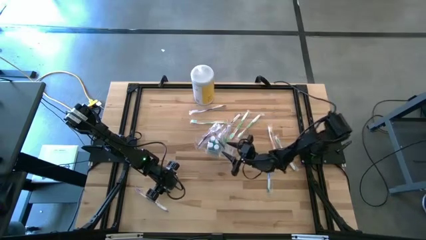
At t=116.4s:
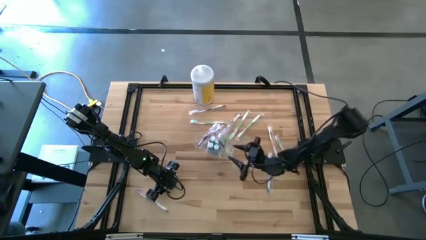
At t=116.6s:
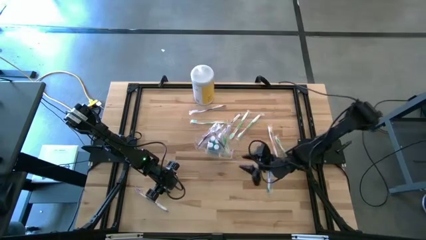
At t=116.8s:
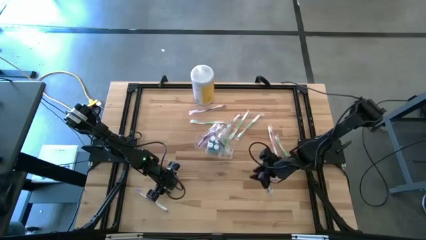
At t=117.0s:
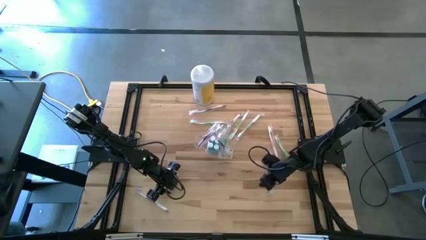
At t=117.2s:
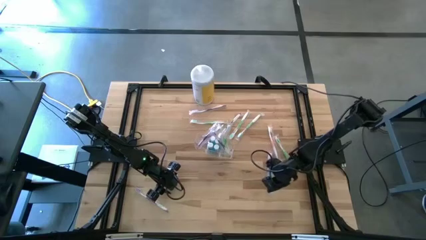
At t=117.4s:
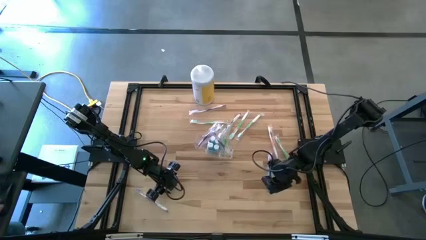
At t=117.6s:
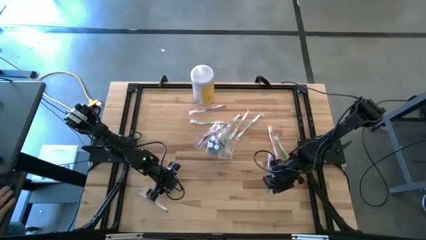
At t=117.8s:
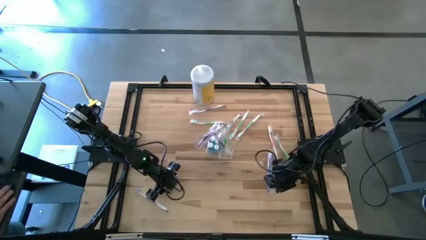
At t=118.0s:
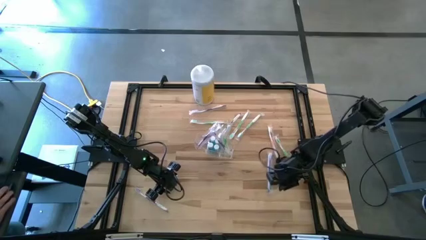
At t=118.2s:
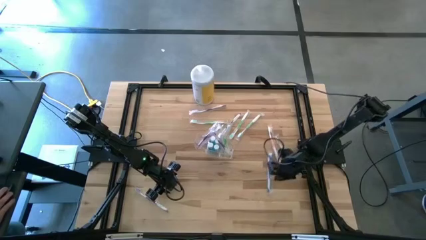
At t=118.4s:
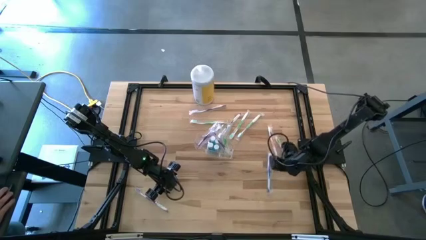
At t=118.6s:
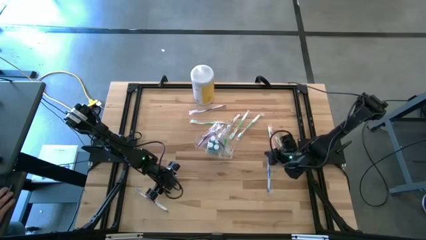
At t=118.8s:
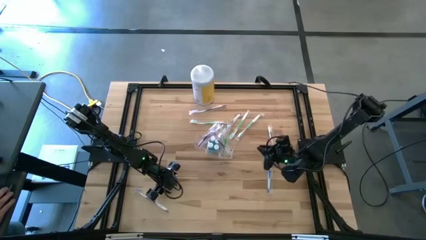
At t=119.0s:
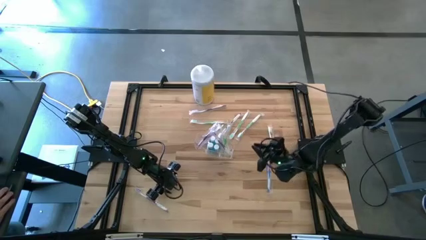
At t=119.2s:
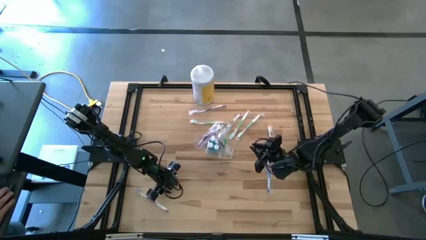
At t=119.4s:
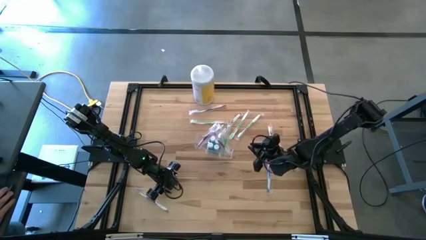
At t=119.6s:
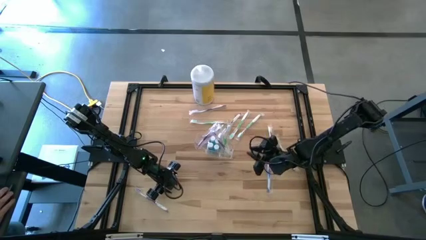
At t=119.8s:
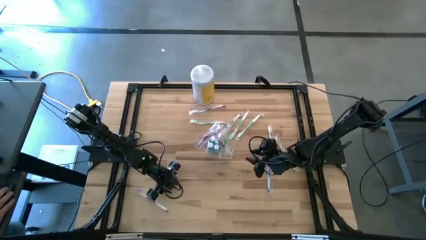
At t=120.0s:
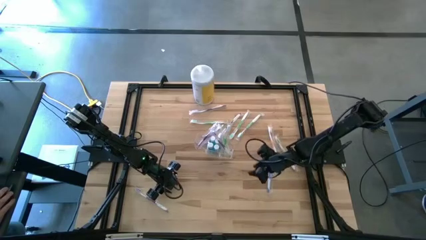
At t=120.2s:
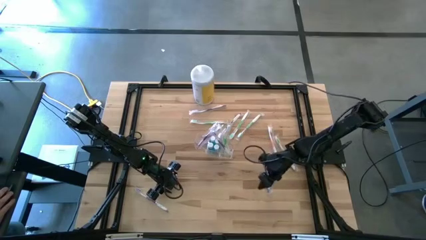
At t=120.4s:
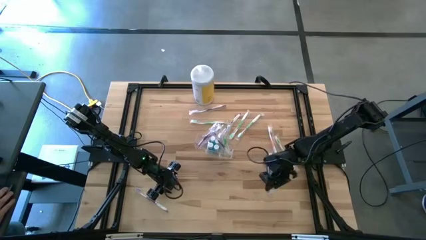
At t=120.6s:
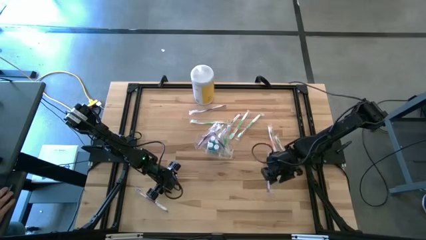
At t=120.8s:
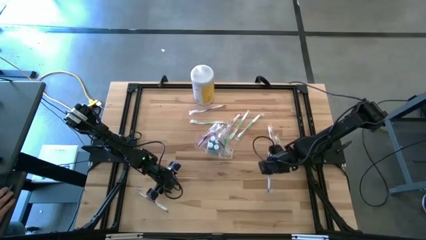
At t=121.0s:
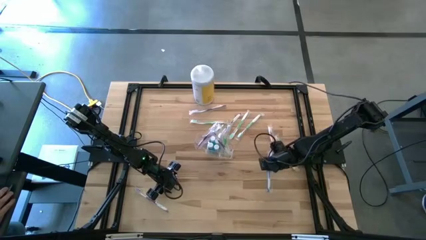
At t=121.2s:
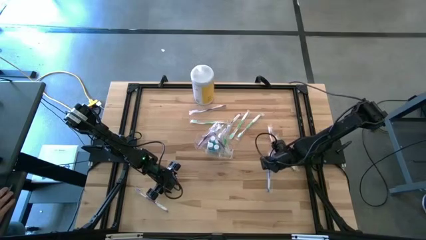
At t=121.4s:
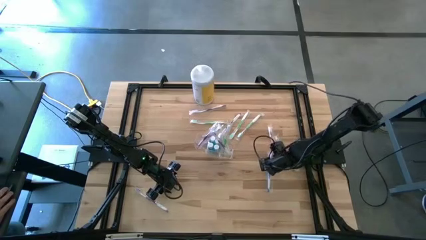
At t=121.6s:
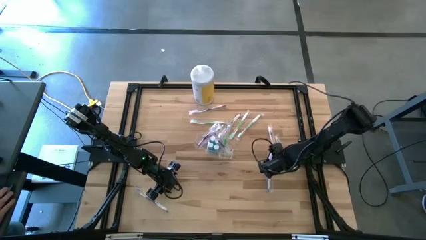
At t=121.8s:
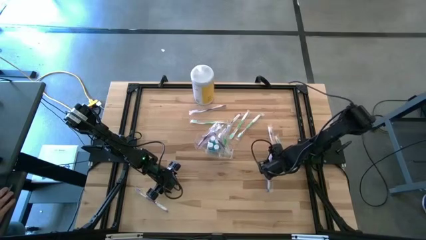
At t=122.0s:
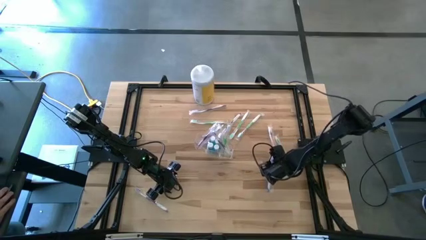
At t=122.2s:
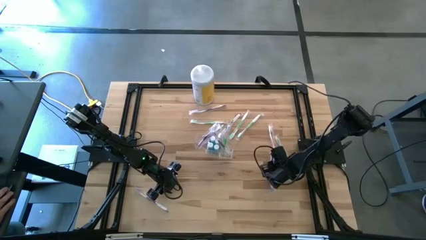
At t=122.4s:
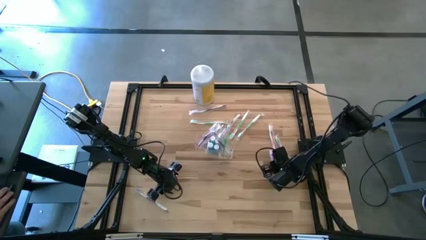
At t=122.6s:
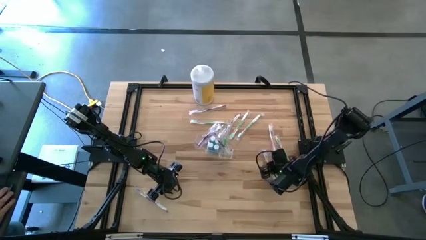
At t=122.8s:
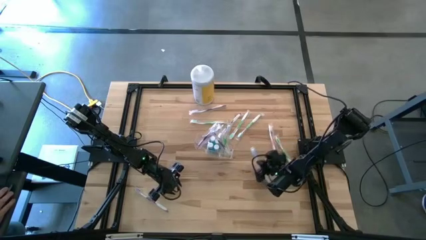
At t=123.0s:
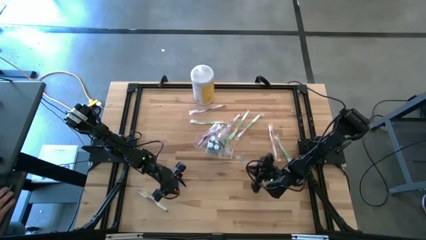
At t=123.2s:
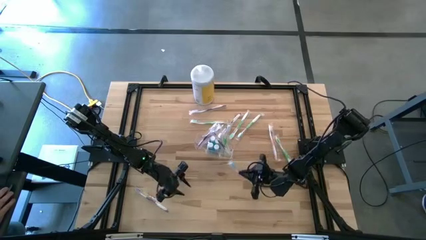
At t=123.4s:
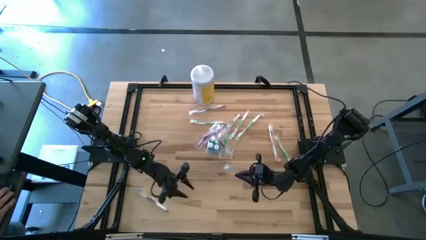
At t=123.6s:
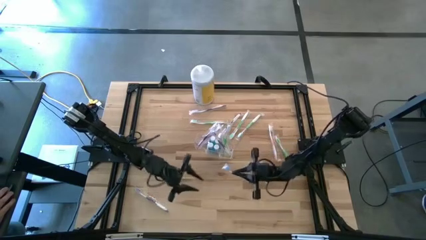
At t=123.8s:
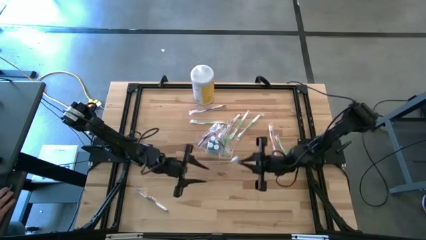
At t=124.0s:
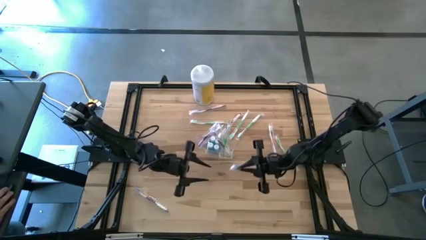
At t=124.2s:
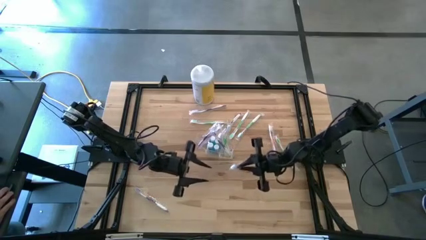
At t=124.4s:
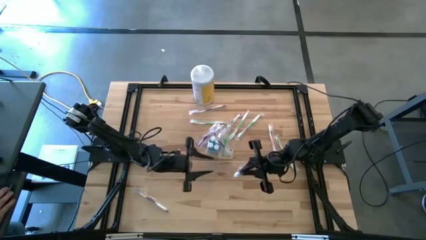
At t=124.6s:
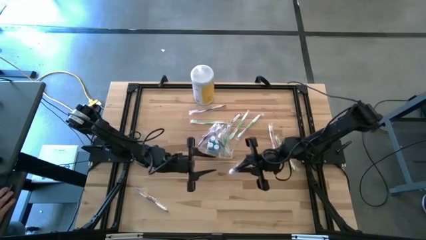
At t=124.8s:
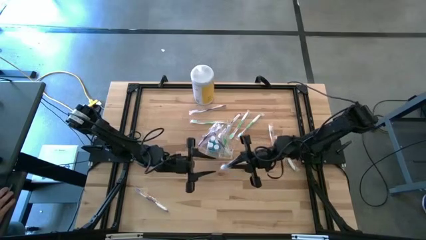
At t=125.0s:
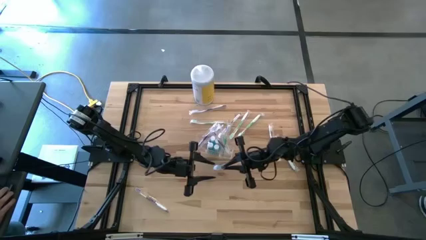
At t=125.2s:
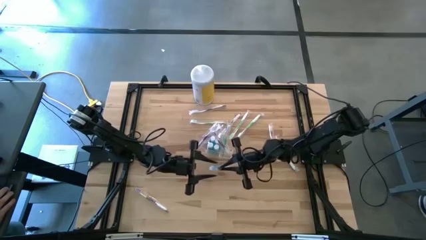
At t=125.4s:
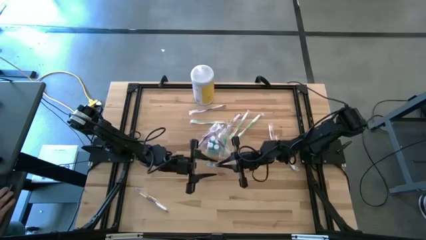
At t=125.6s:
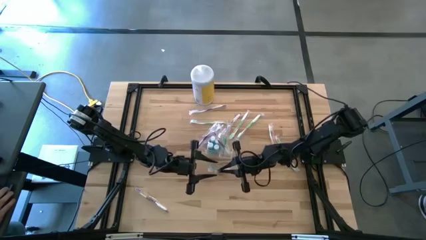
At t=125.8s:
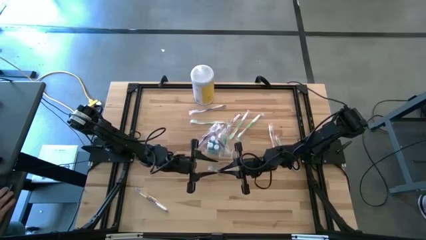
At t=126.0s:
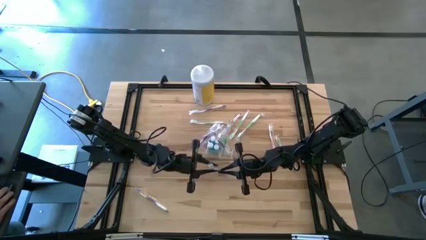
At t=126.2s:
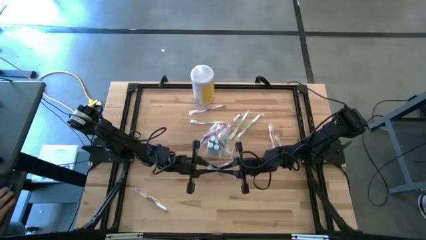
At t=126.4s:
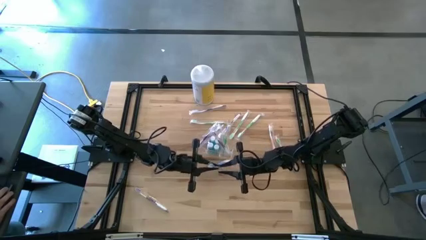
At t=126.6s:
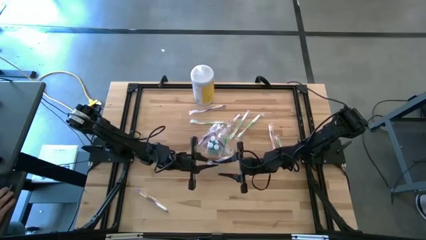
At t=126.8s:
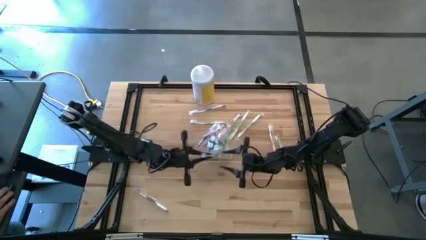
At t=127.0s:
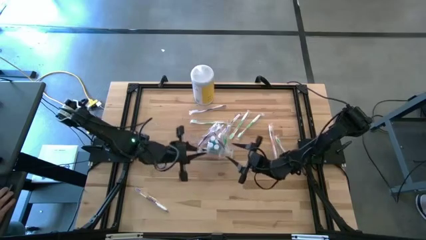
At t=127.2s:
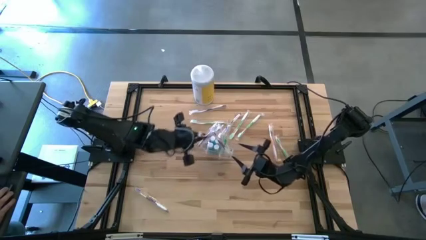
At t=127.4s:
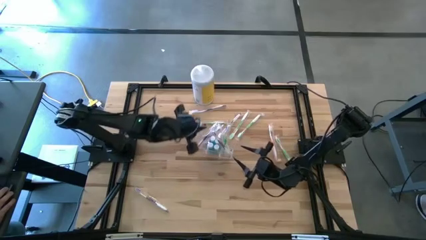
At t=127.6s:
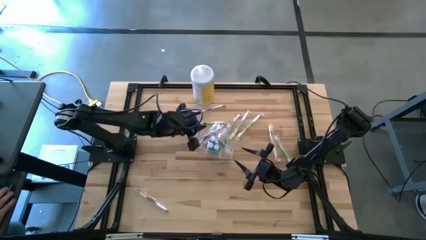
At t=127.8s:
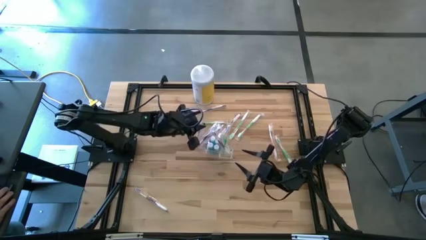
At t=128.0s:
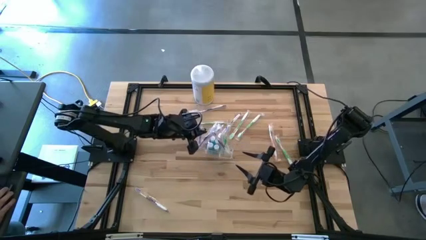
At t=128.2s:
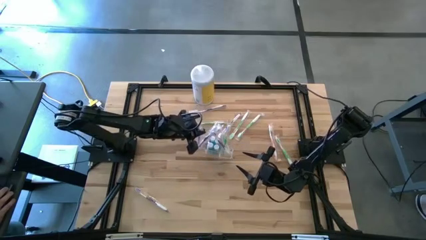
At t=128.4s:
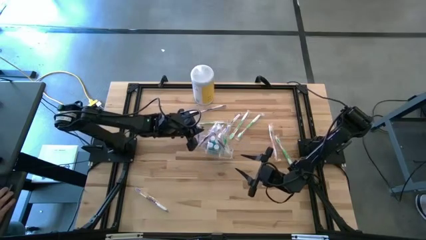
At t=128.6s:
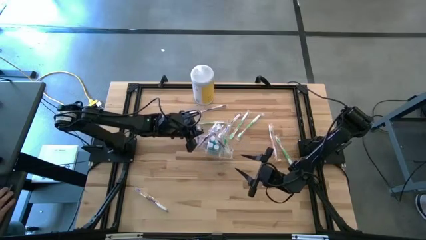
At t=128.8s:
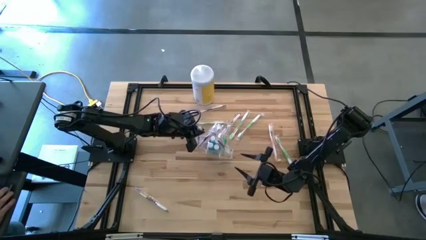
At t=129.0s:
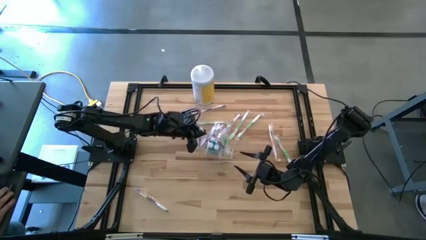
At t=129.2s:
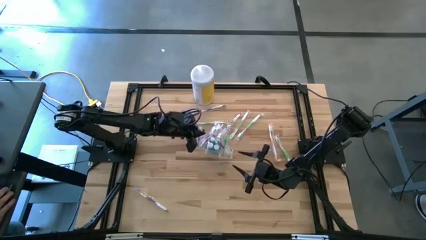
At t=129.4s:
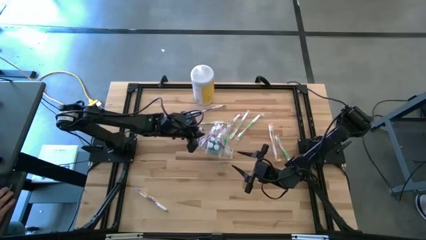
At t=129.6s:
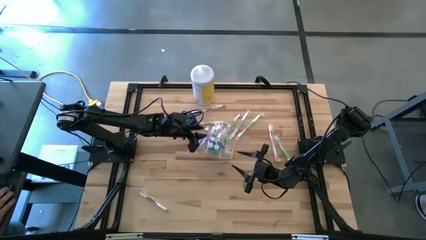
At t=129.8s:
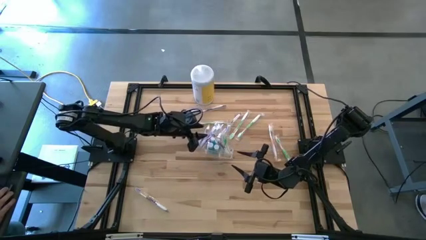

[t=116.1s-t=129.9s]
Task: Pick & Place toothbrushing station
Put the blue toothbrush into the transparent organizer

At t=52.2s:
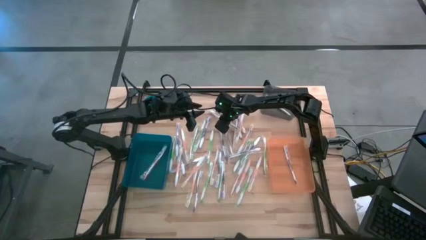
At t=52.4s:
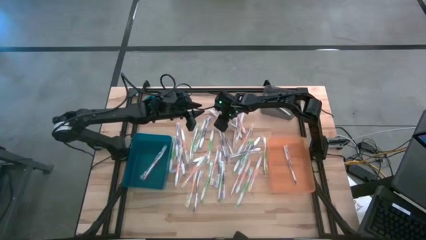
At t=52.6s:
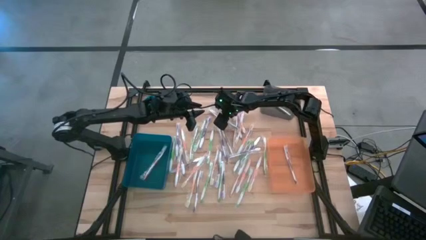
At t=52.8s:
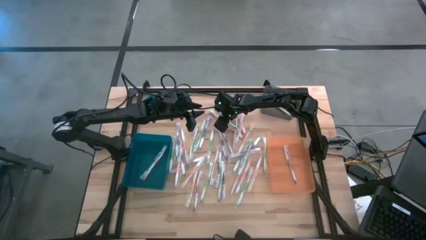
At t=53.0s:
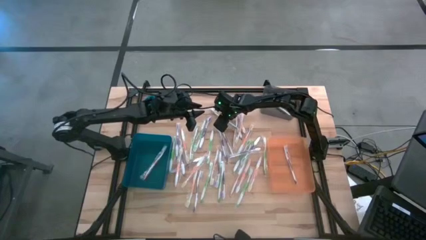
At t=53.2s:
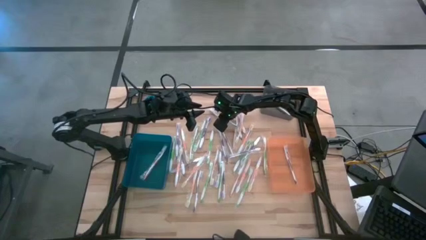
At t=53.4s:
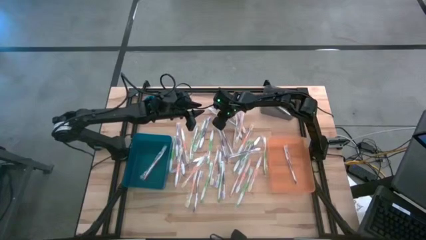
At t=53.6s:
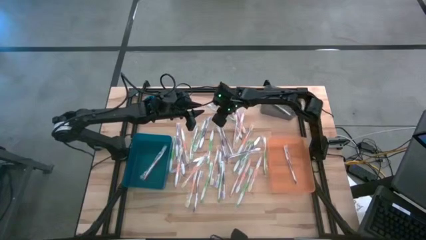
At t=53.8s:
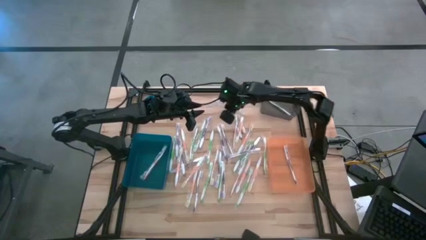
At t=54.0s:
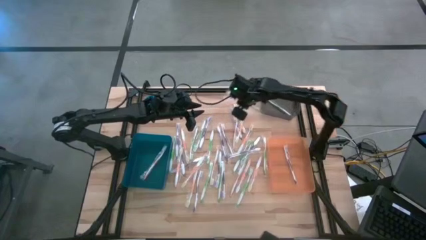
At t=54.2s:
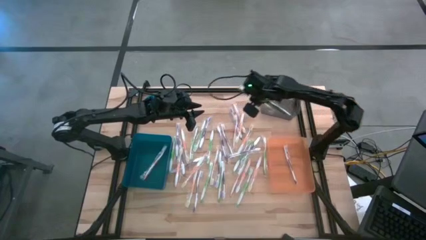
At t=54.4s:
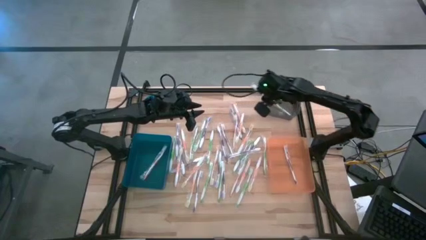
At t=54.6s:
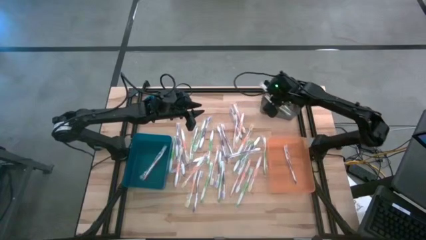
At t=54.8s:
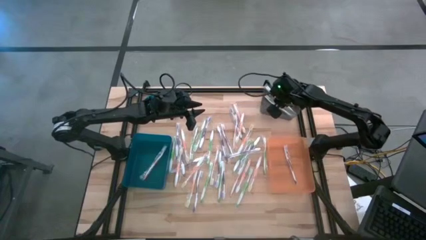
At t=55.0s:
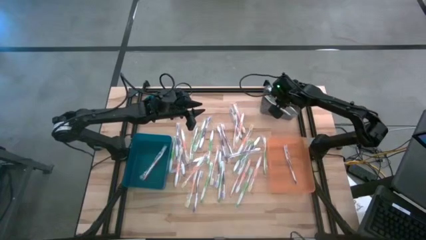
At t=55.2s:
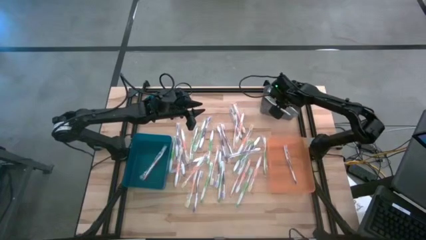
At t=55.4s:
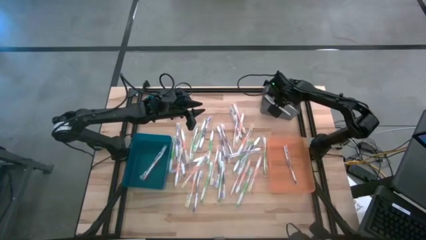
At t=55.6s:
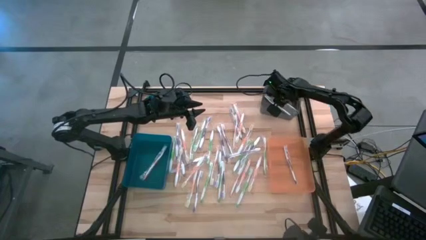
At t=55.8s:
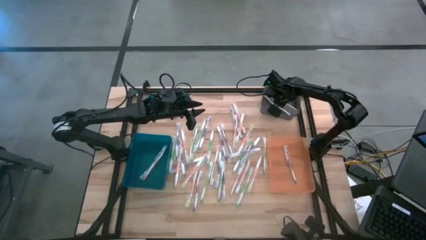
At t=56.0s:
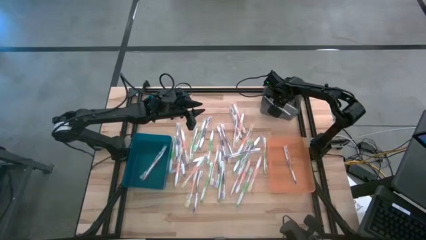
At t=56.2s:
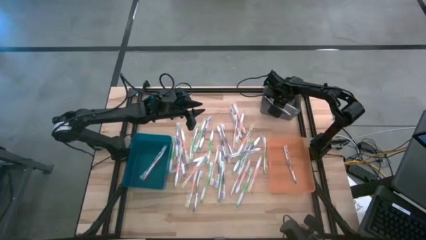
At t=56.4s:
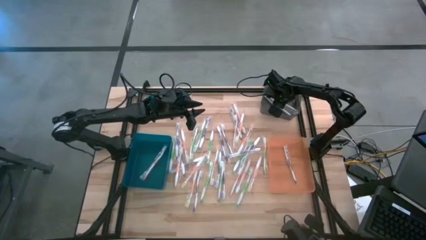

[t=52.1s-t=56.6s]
Task: Pick & Place Toothbrushes
Put the green toothbrush into the black bin
